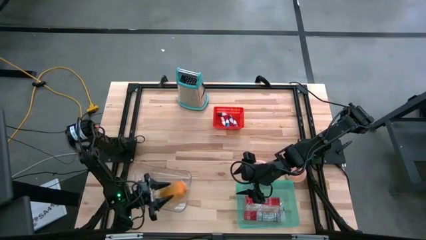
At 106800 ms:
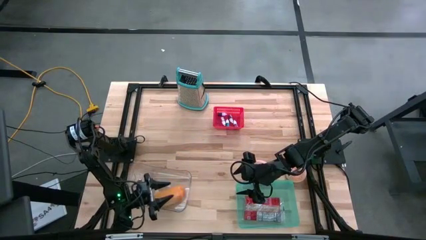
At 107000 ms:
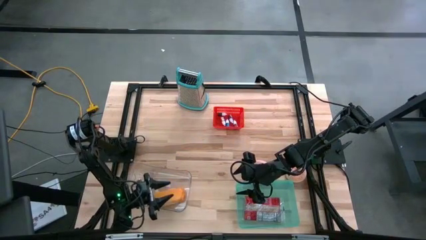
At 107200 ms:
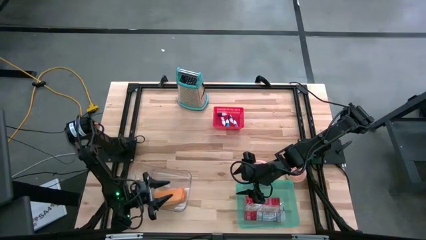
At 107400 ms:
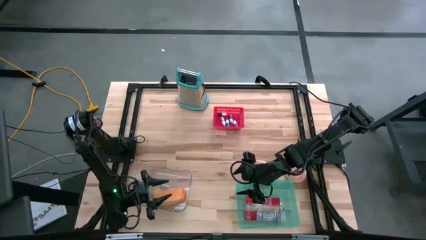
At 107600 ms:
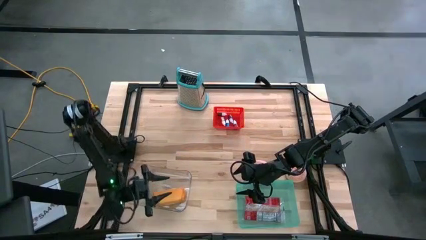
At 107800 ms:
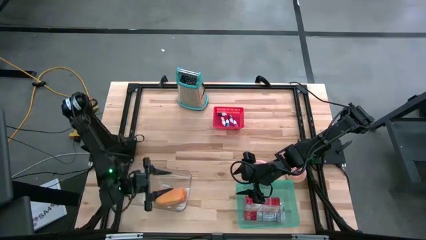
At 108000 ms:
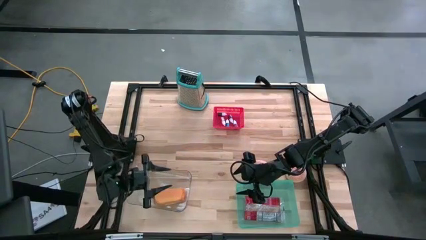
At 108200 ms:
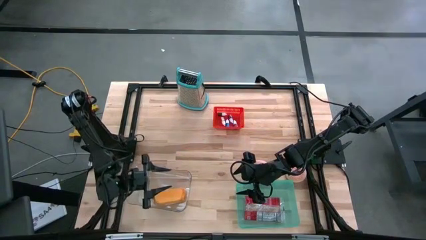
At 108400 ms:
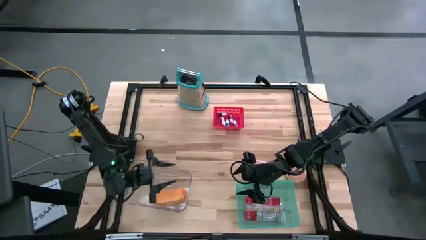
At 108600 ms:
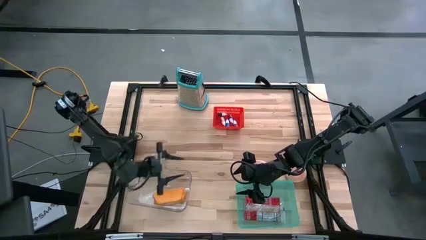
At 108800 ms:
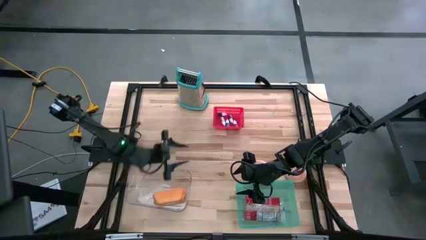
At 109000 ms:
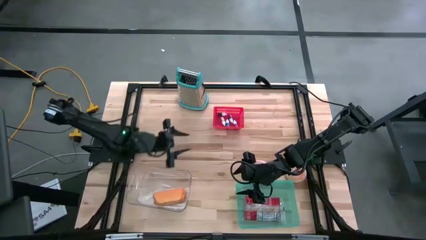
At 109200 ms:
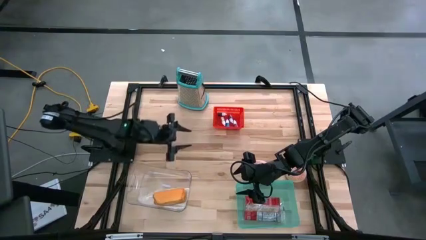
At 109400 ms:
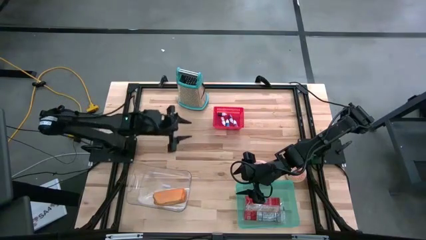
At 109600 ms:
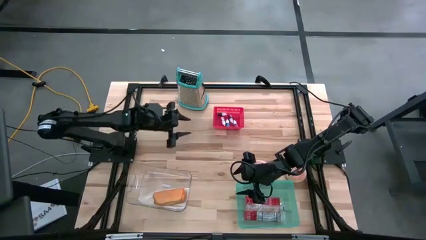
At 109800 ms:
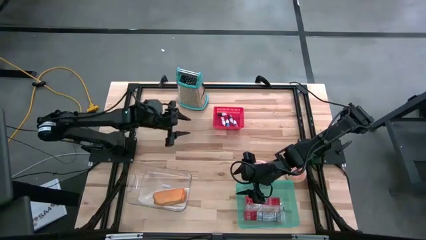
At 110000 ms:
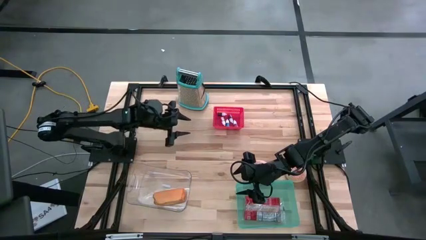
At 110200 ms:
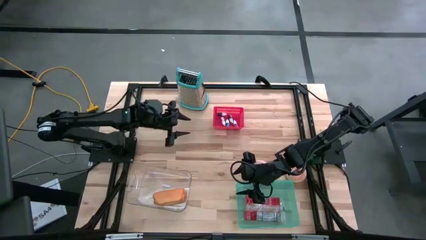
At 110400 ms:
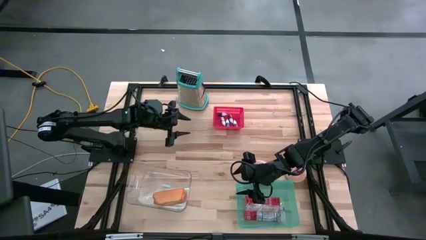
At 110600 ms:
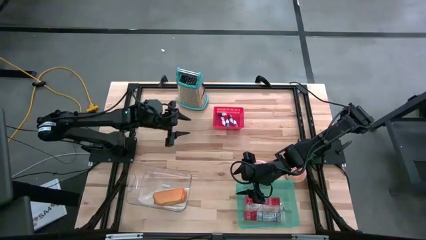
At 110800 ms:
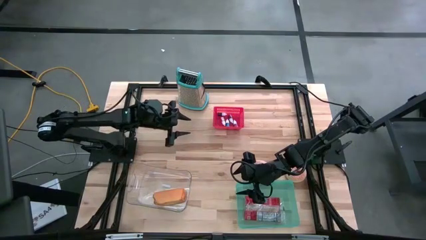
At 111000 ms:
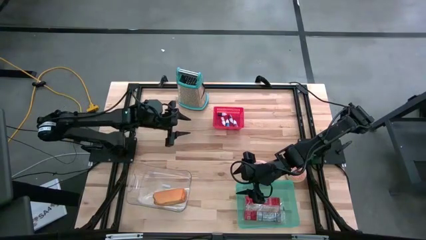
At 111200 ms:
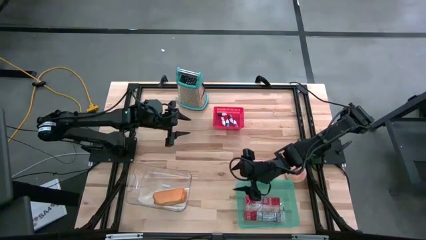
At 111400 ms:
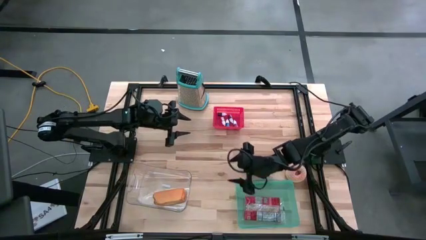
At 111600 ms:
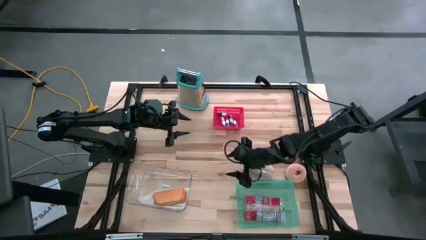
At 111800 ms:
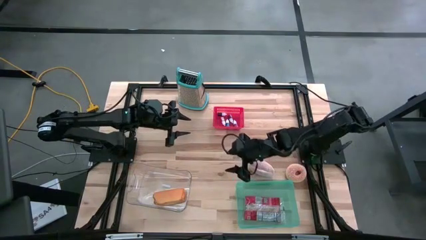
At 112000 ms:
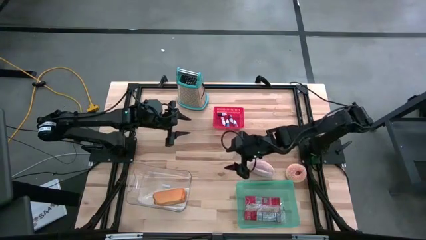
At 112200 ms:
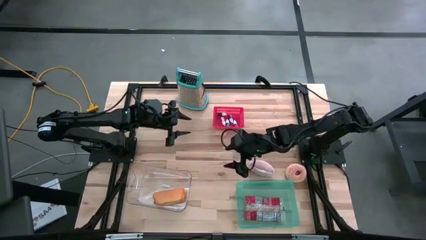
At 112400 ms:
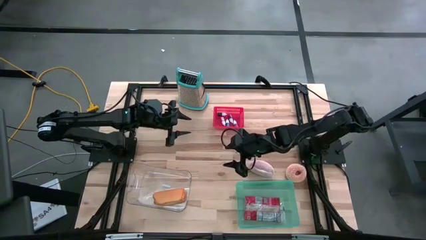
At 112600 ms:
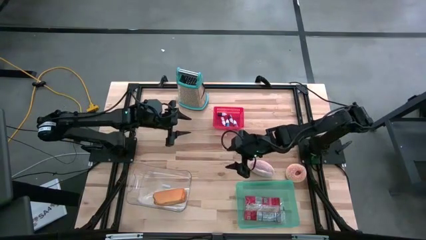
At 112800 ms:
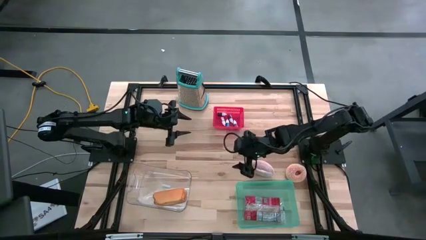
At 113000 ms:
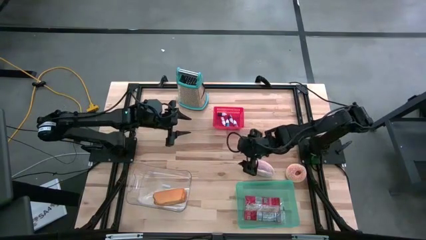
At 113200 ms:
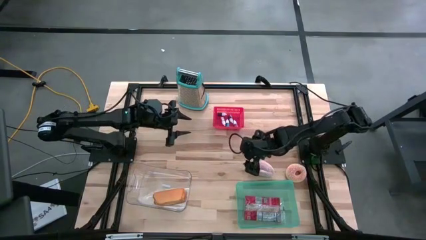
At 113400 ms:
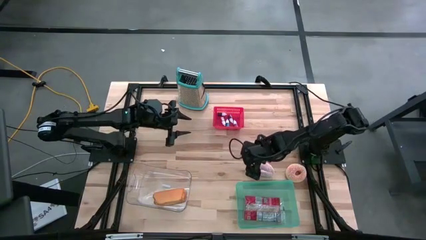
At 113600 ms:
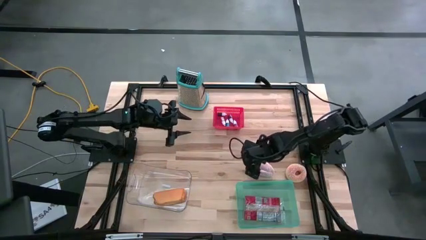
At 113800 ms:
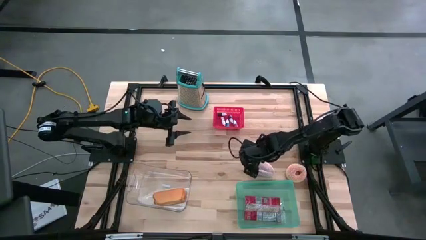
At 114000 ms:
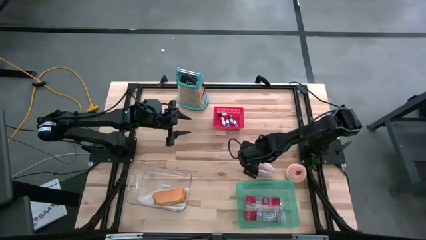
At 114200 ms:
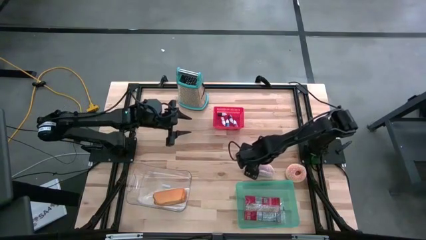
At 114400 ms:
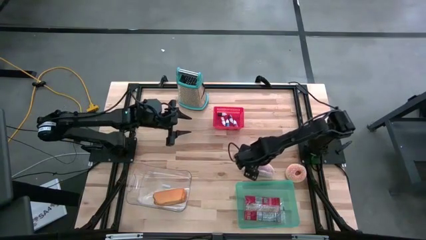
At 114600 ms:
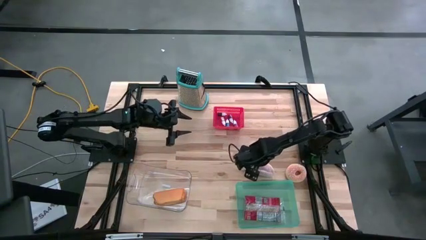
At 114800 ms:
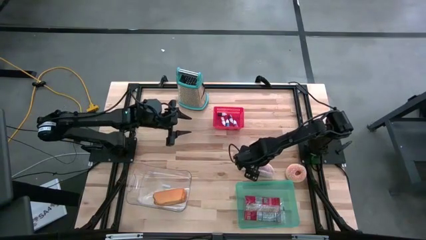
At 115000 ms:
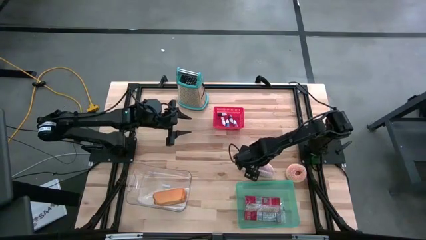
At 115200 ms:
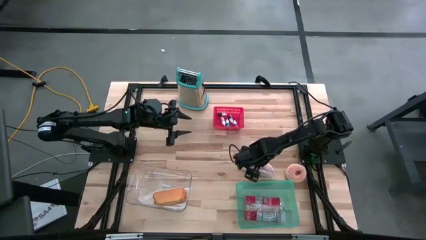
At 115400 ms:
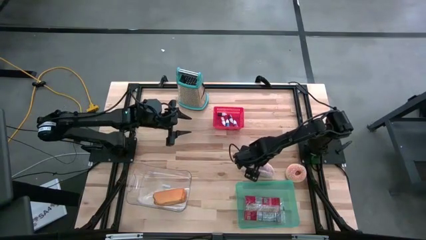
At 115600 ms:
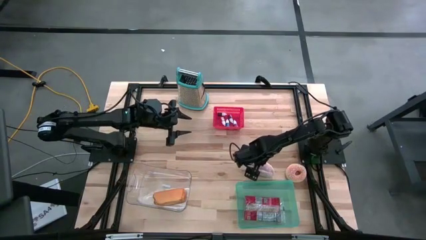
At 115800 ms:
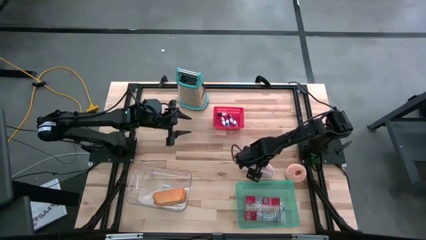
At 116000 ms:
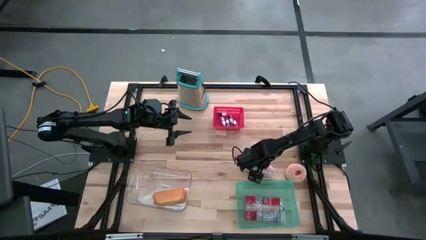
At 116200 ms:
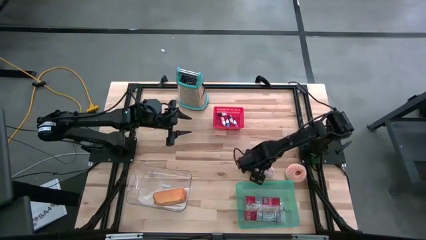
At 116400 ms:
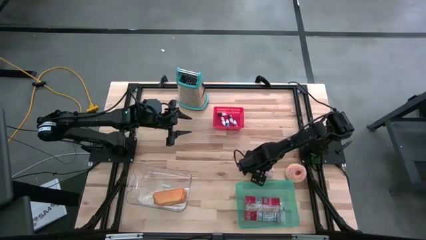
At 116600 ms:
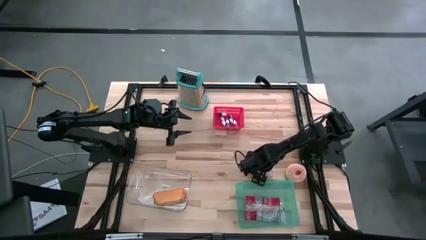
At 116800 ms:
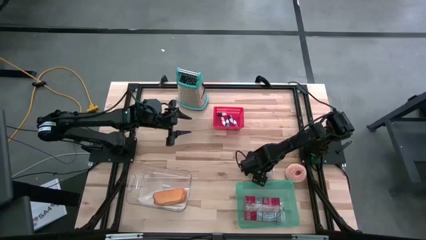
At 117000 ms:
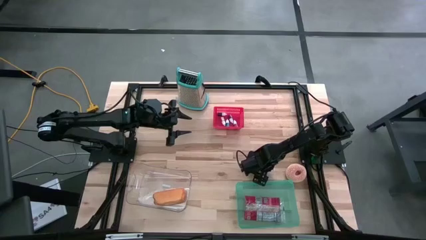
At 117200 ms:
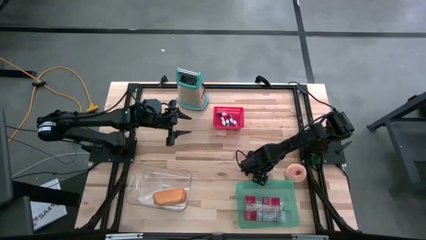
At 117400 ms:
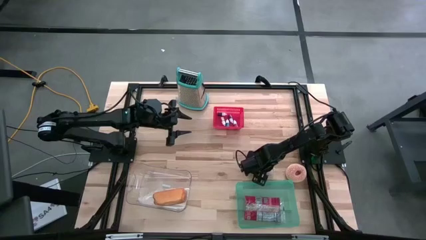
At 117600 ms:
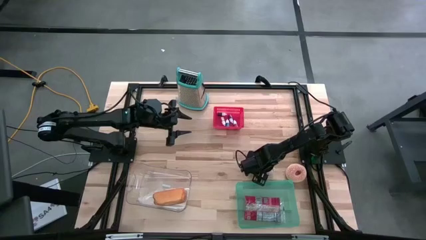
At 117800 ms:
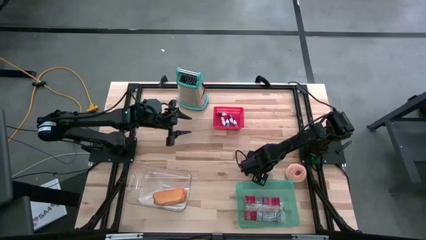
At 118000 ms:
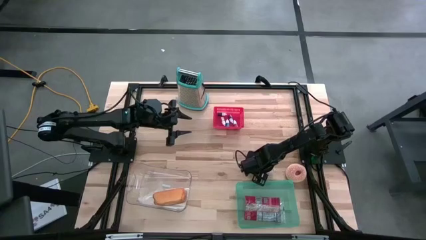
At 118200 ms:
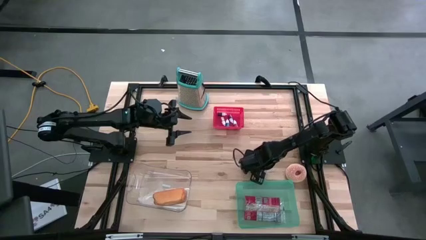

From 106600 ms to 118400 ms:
Put the bread into the transparent bin
